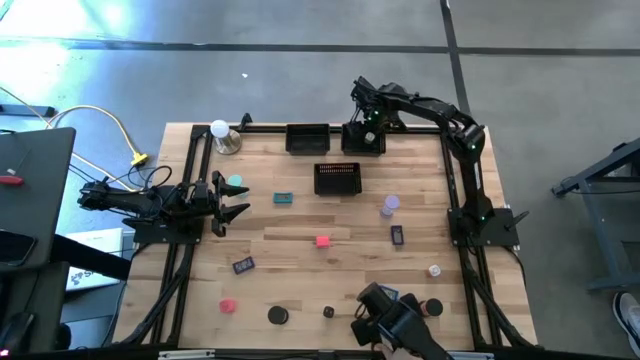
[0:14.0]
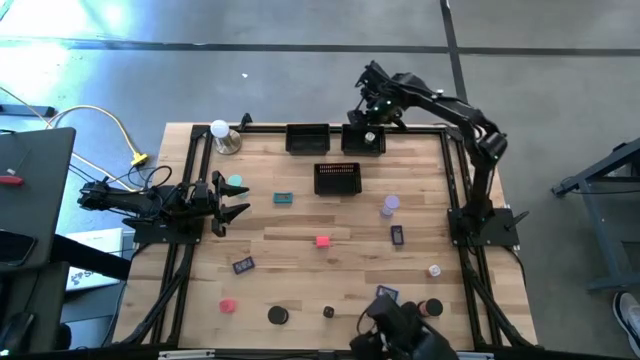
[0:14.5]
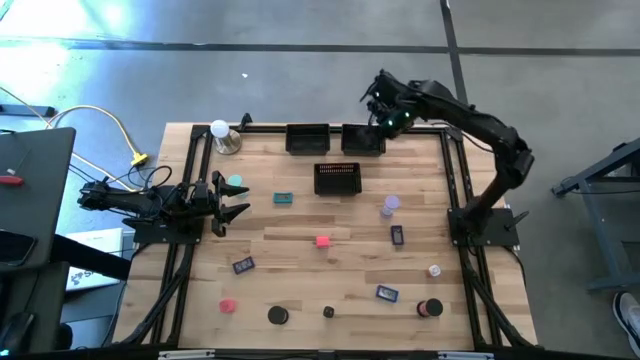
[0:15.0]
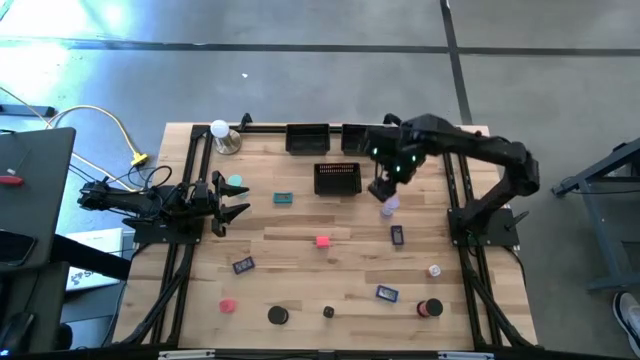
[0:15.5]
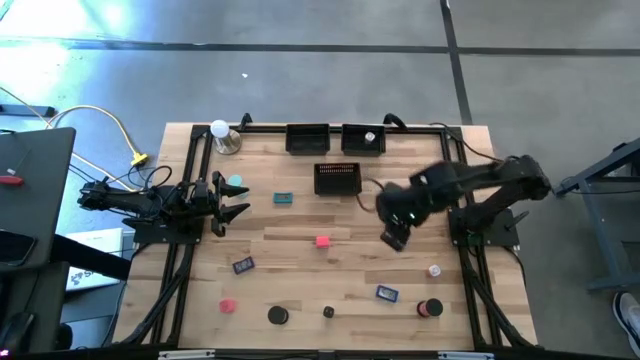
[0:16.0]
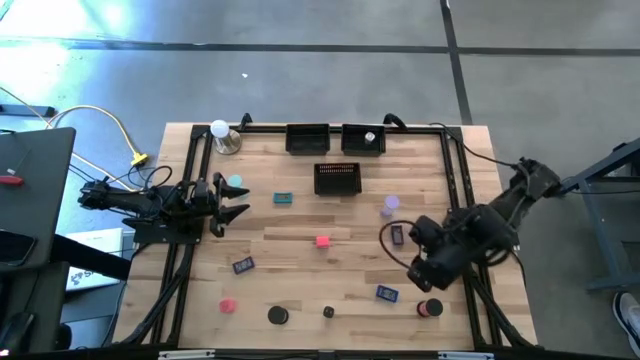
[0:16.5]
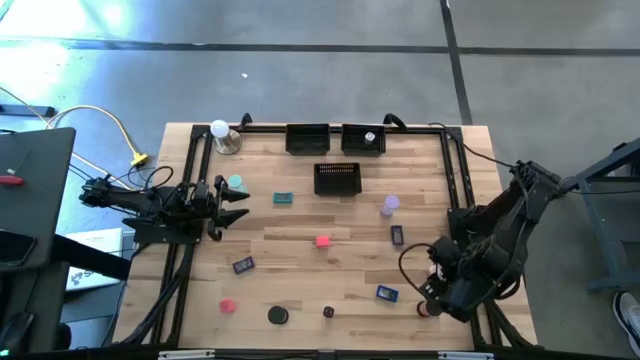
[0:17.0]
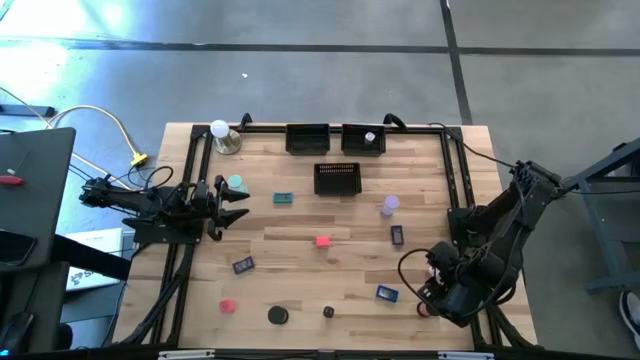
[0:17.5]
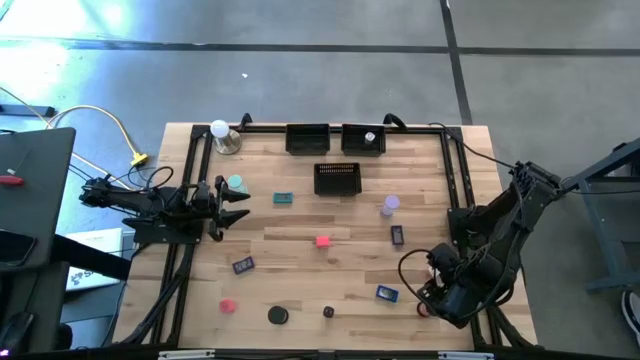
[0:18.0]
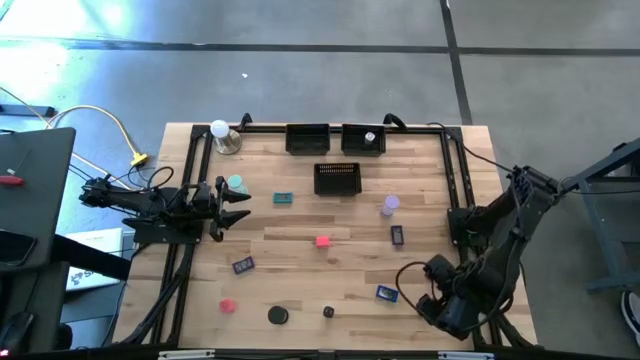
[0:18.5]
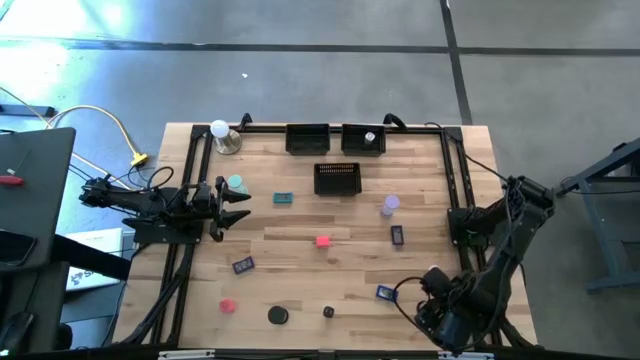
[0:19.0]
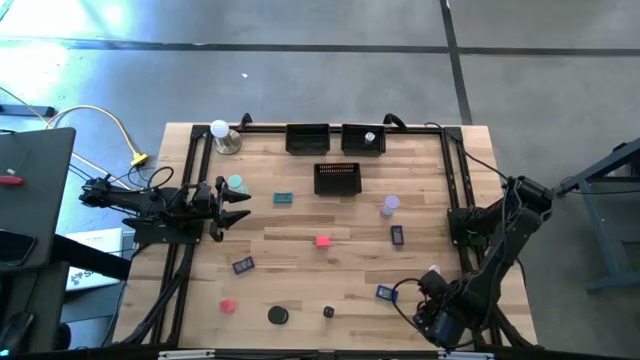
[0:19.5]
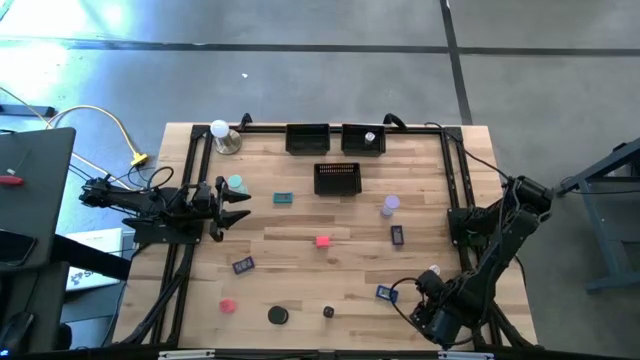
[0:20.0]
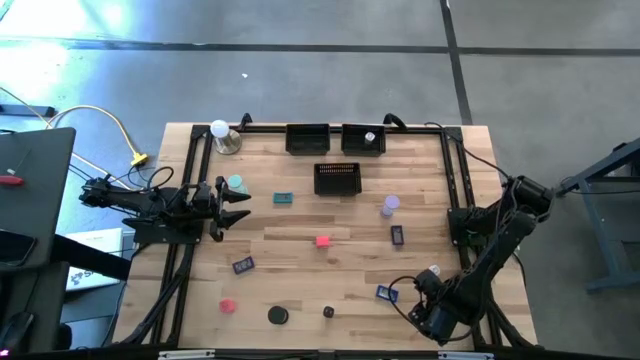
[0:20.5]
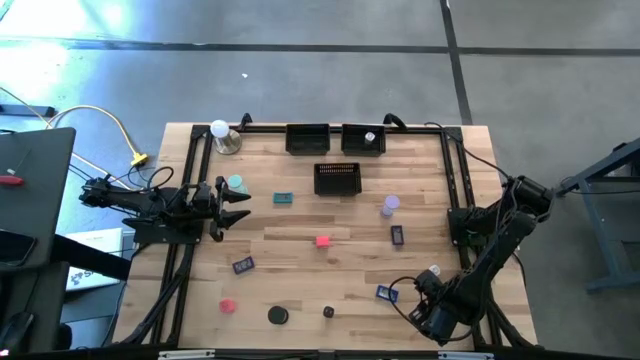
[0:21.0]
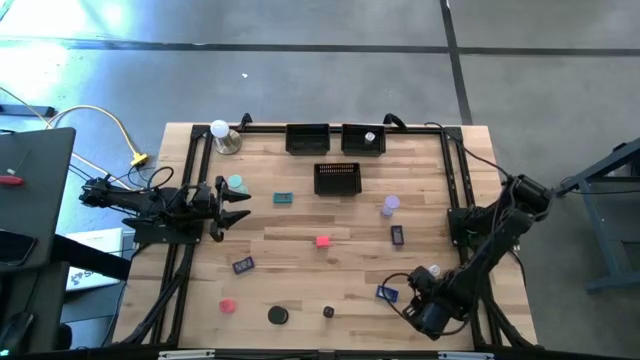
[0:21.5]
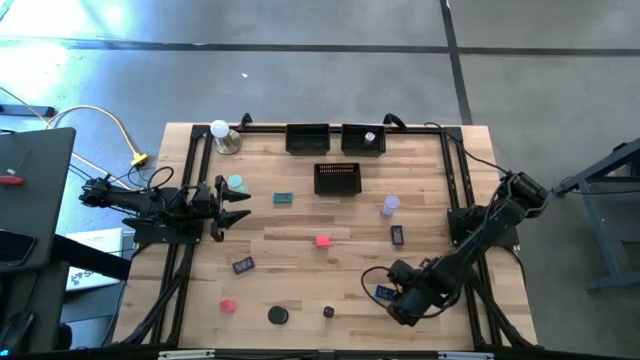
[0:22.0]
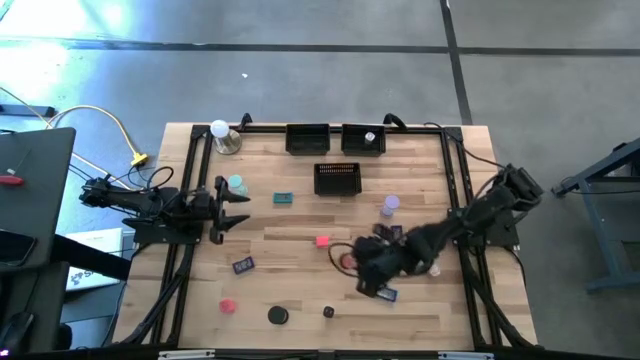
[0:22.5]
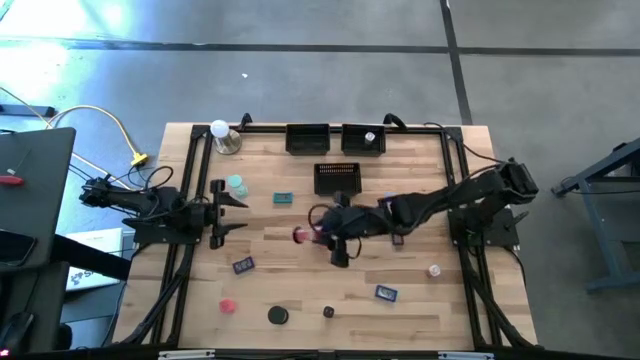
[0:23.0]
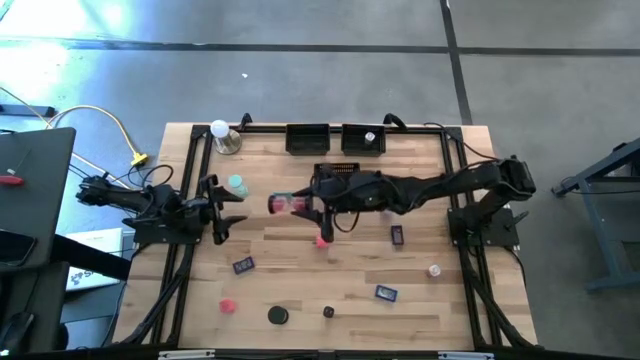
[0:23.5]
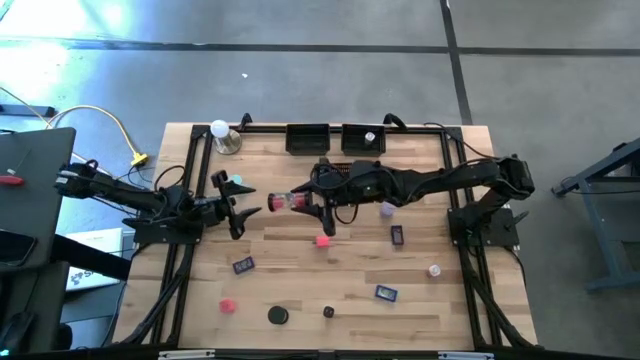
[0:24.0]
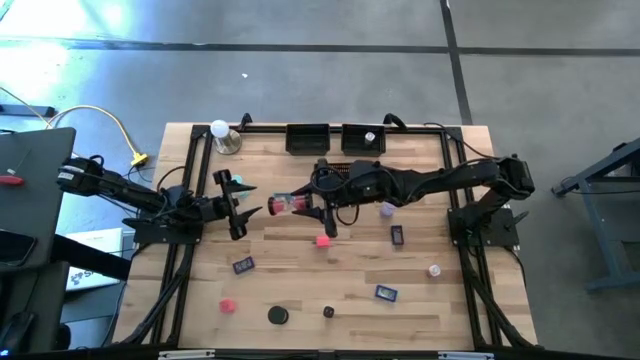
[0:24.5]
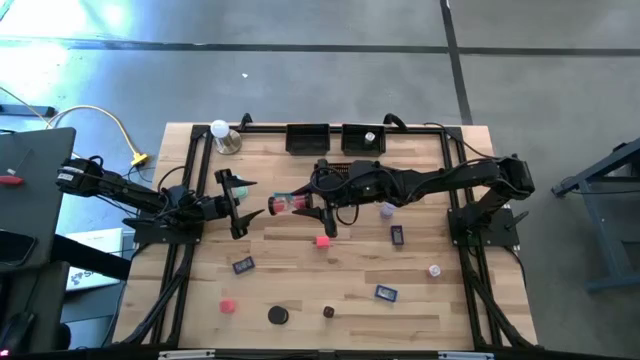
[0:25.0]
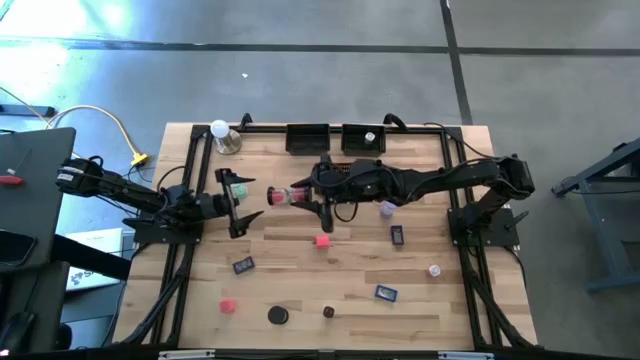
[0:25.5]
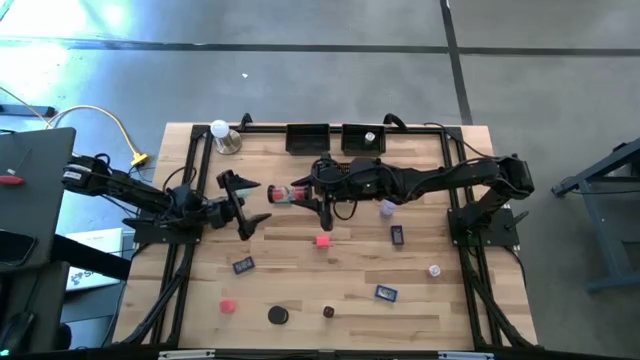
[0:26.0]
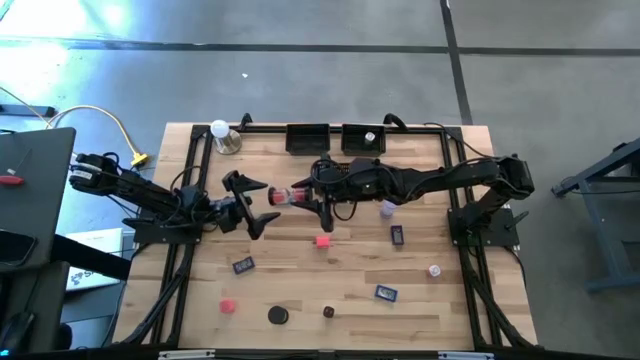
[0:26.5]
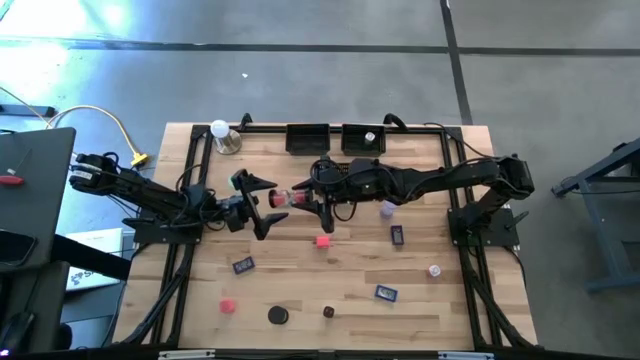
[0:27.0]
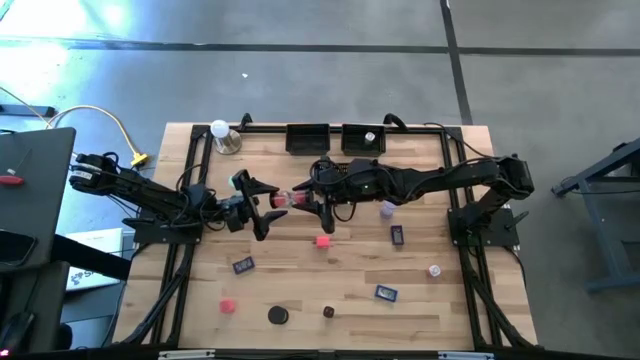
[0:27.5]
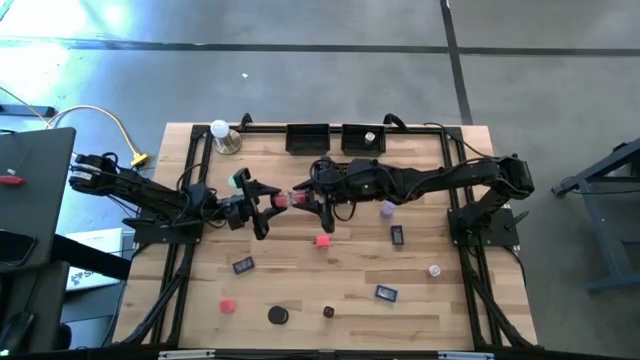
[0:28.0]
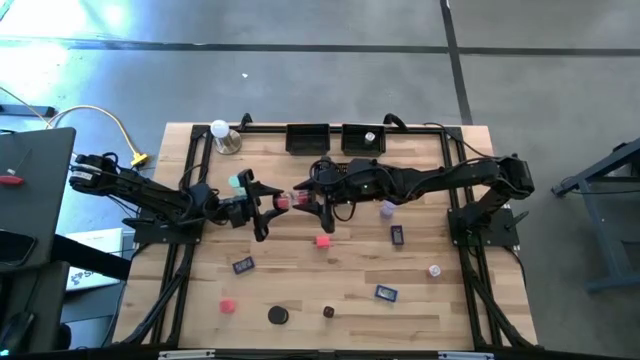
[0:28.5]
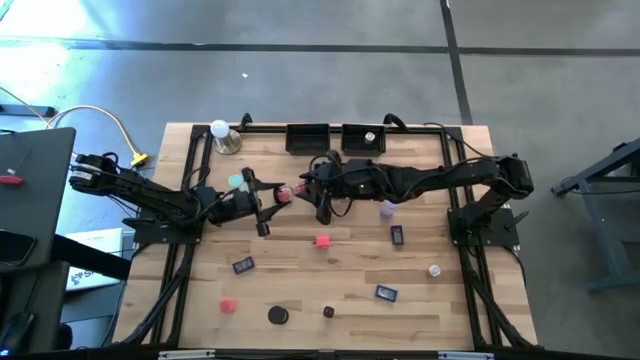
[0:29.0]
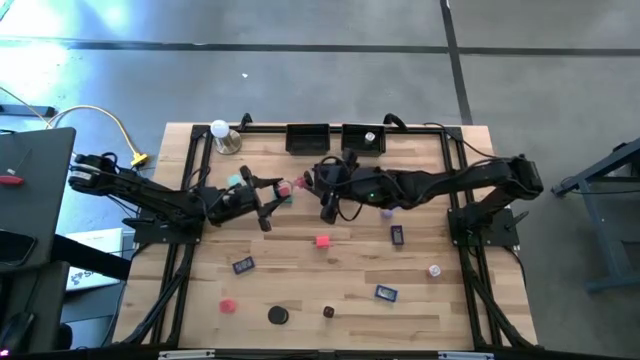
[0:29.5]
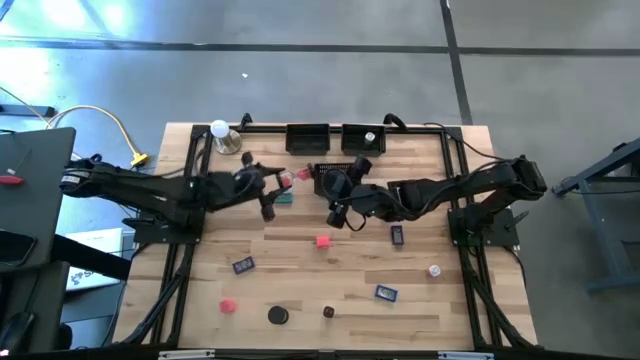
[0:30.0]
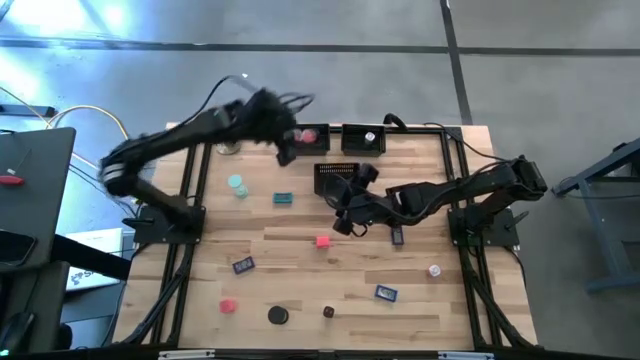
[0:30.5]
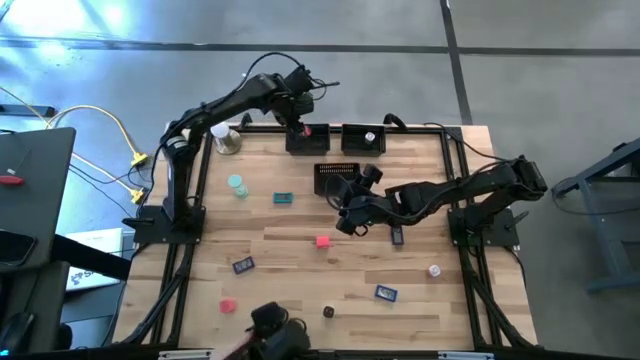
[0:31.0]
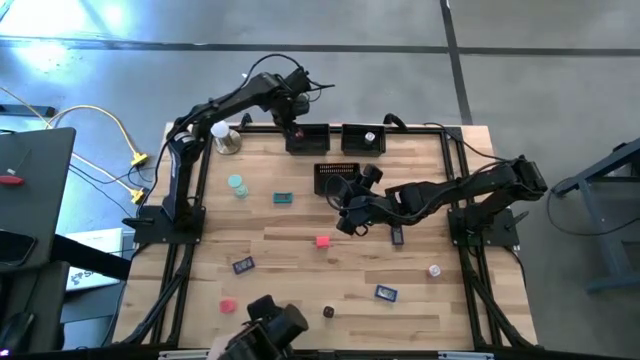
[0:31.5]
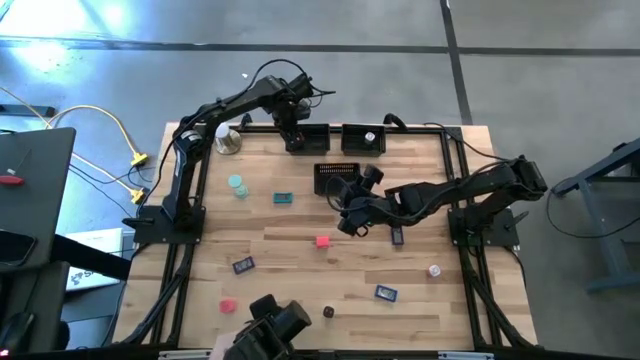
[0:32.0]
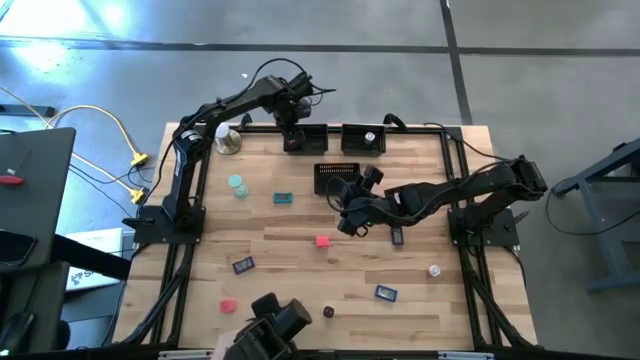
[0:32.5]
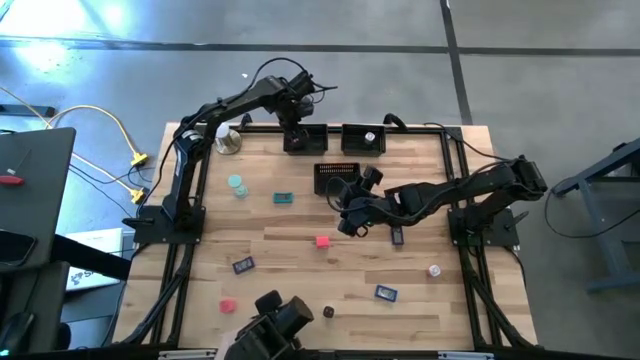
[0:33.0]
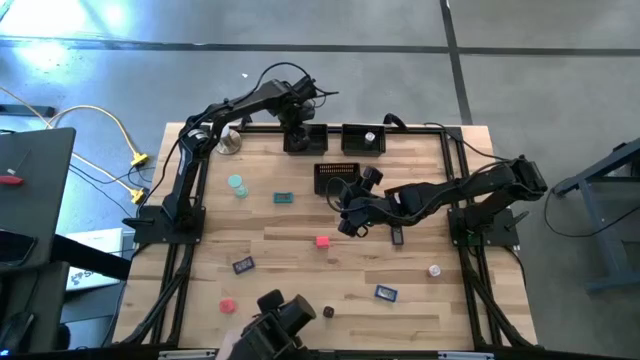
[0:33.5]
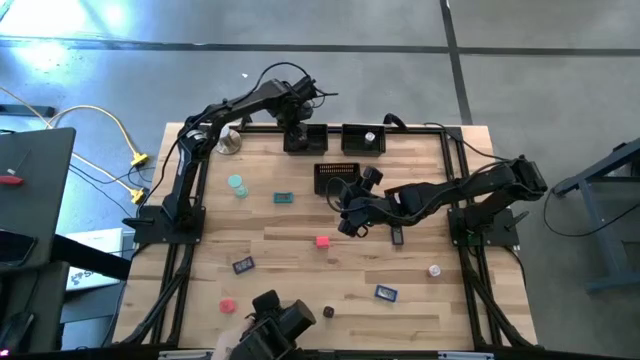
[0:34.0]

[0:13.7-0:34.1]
Task: Pick & Place Office items
Put the red hourglass into the top left black bin
